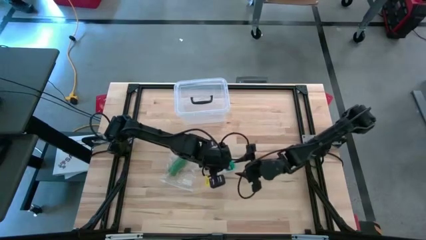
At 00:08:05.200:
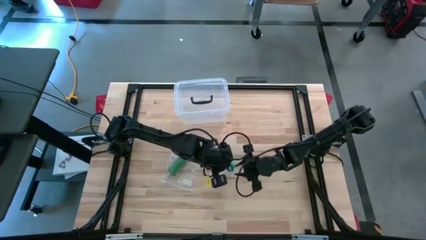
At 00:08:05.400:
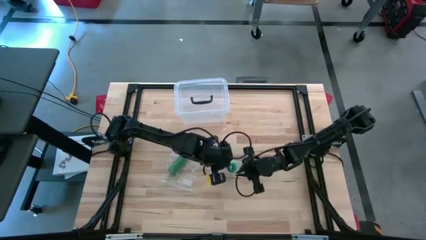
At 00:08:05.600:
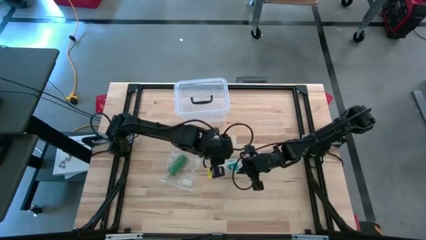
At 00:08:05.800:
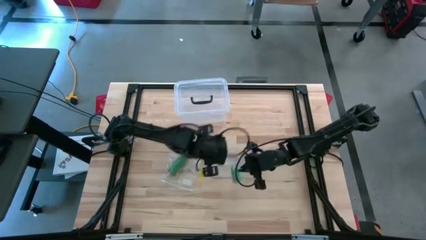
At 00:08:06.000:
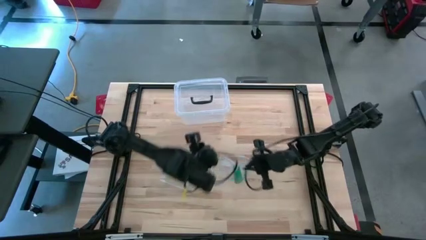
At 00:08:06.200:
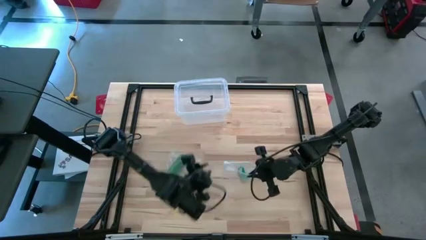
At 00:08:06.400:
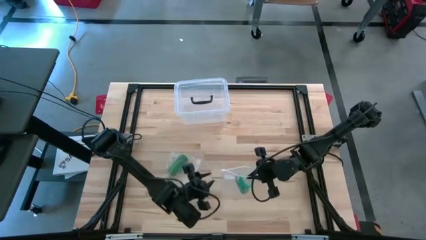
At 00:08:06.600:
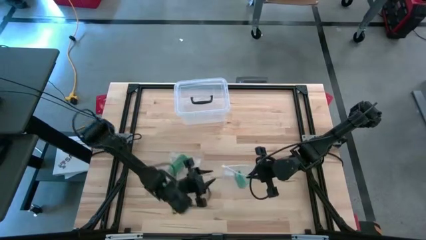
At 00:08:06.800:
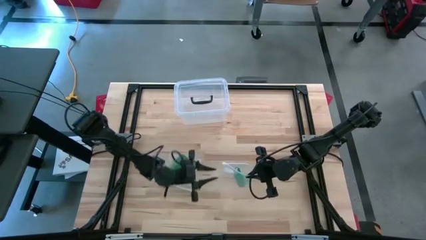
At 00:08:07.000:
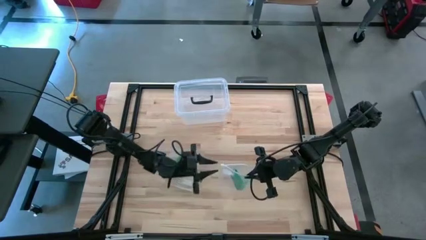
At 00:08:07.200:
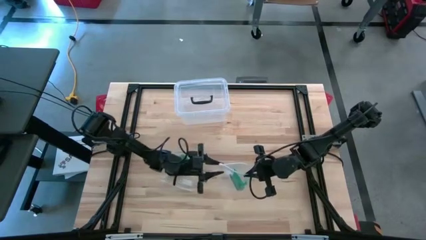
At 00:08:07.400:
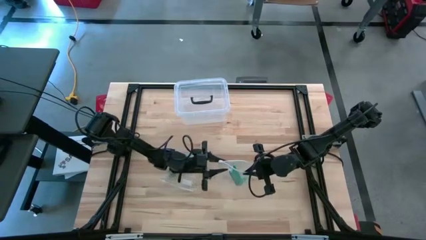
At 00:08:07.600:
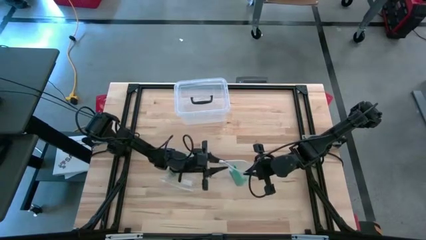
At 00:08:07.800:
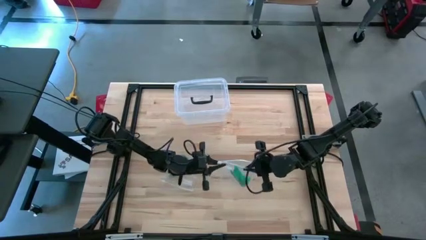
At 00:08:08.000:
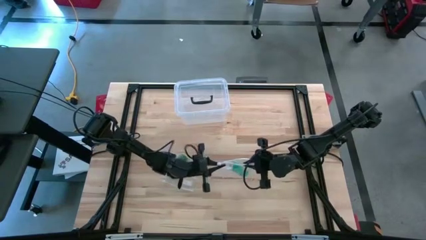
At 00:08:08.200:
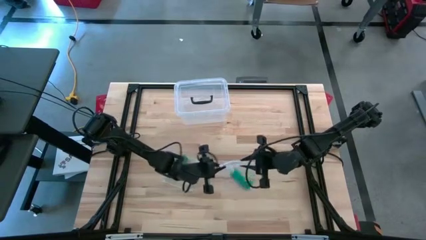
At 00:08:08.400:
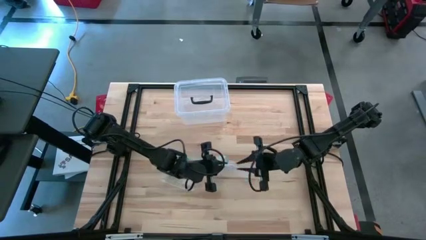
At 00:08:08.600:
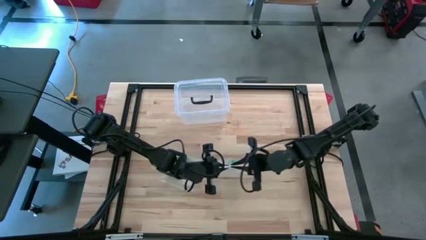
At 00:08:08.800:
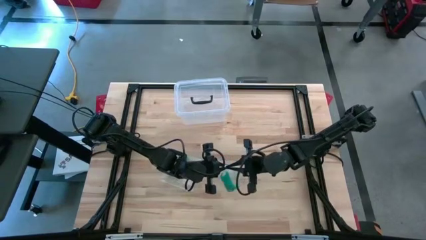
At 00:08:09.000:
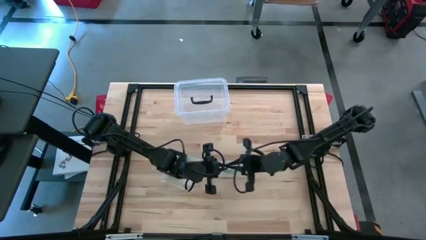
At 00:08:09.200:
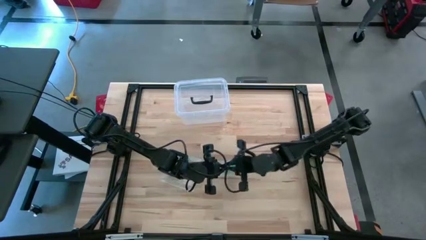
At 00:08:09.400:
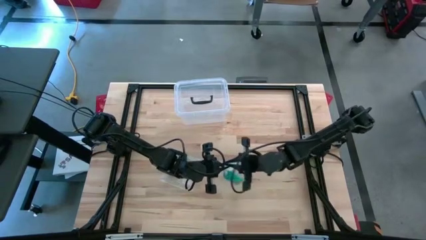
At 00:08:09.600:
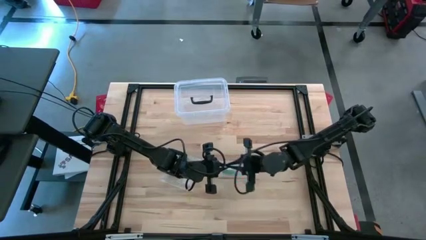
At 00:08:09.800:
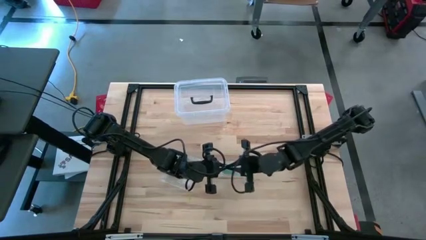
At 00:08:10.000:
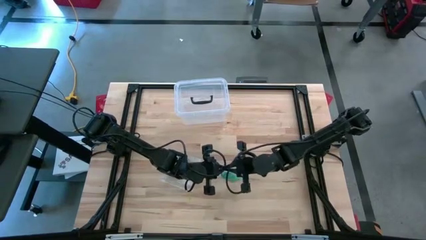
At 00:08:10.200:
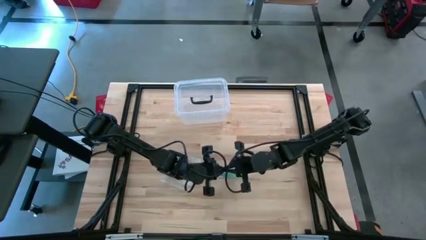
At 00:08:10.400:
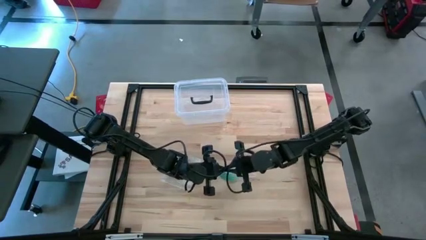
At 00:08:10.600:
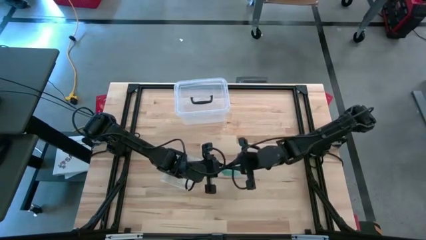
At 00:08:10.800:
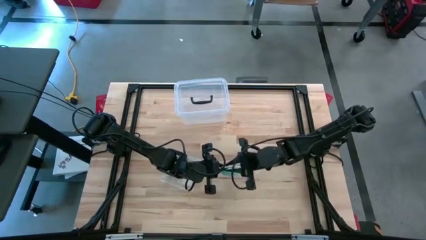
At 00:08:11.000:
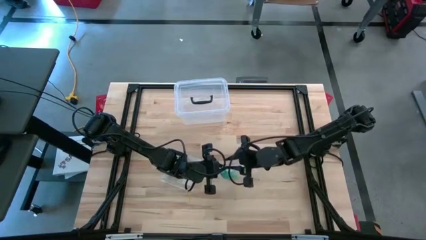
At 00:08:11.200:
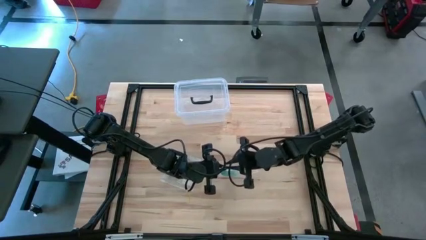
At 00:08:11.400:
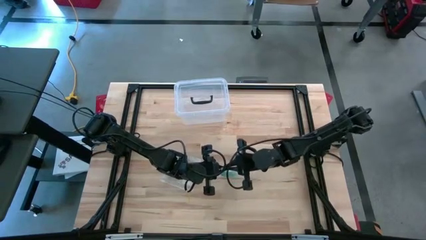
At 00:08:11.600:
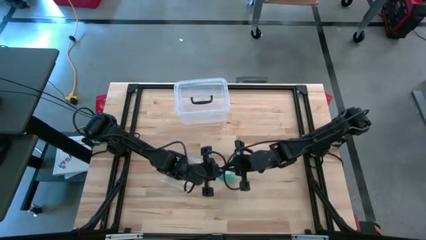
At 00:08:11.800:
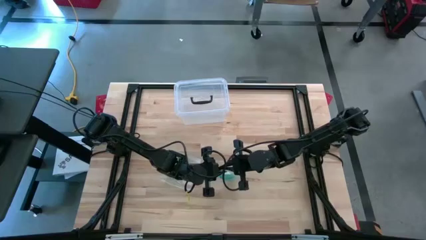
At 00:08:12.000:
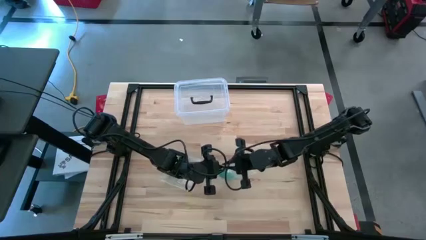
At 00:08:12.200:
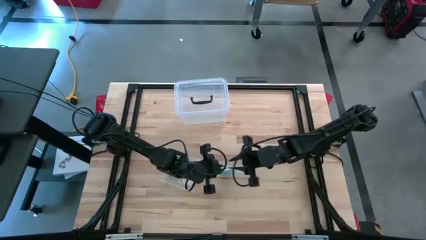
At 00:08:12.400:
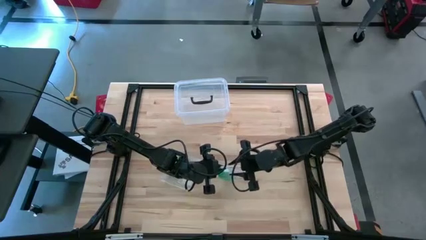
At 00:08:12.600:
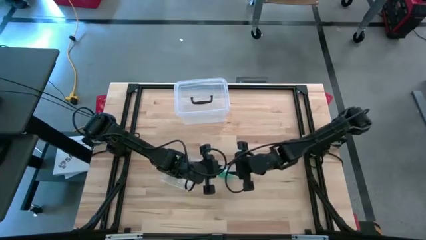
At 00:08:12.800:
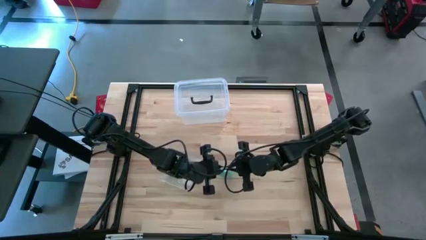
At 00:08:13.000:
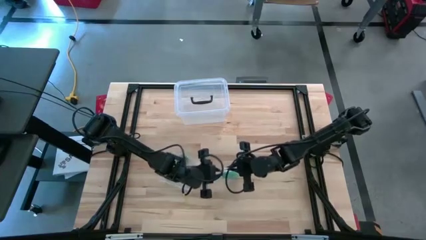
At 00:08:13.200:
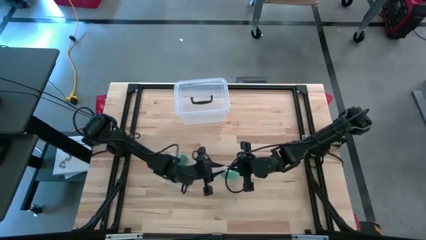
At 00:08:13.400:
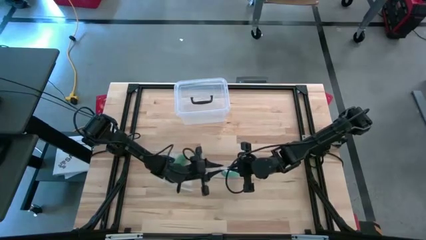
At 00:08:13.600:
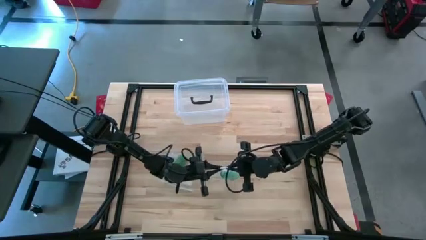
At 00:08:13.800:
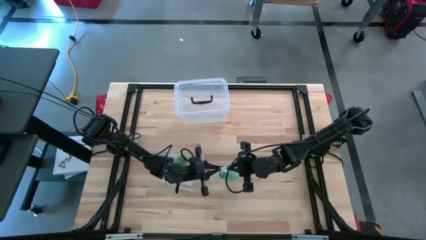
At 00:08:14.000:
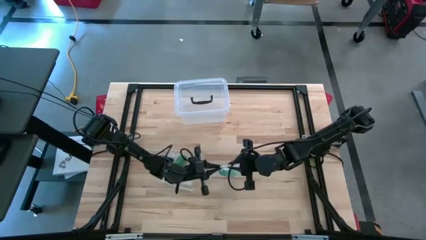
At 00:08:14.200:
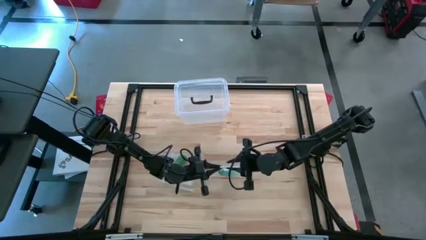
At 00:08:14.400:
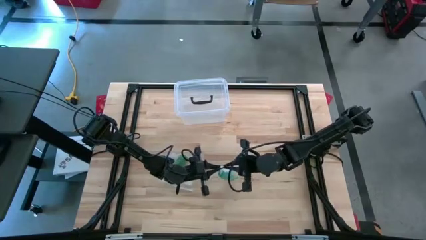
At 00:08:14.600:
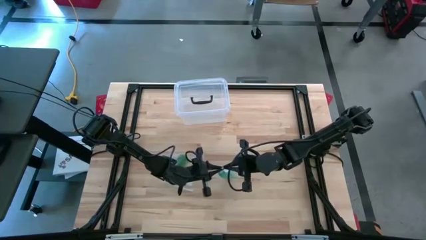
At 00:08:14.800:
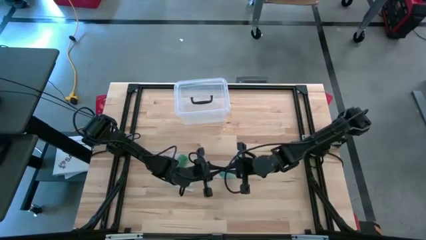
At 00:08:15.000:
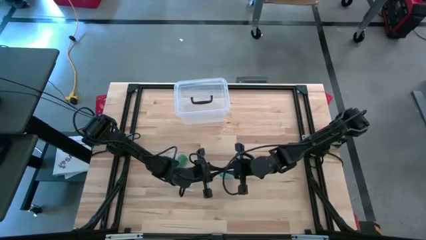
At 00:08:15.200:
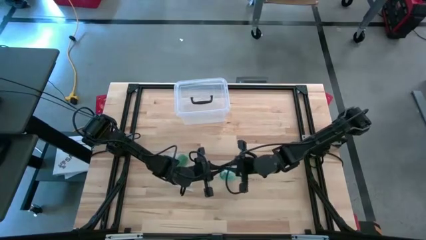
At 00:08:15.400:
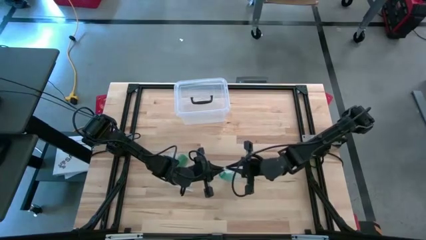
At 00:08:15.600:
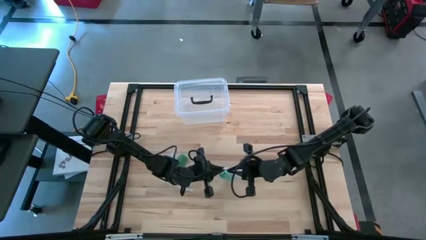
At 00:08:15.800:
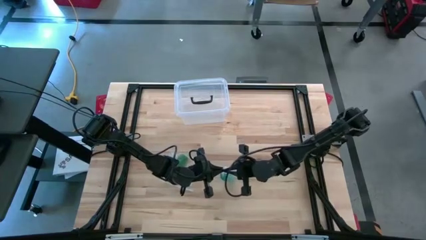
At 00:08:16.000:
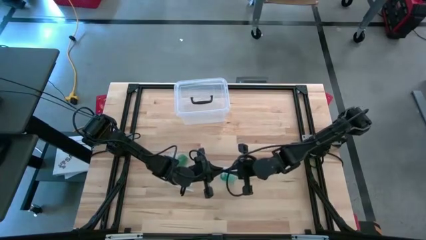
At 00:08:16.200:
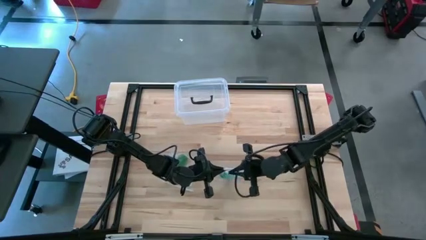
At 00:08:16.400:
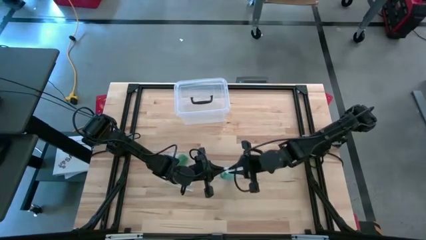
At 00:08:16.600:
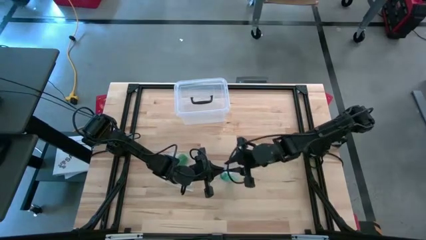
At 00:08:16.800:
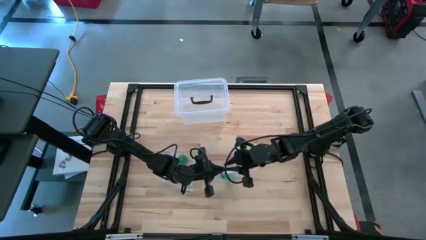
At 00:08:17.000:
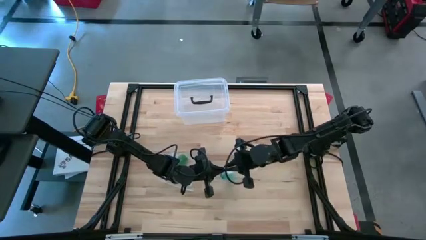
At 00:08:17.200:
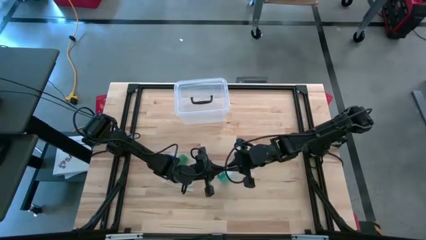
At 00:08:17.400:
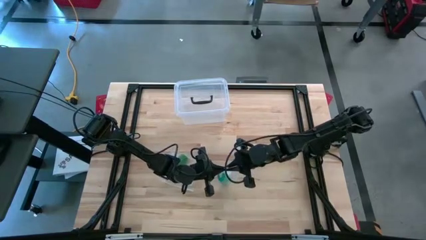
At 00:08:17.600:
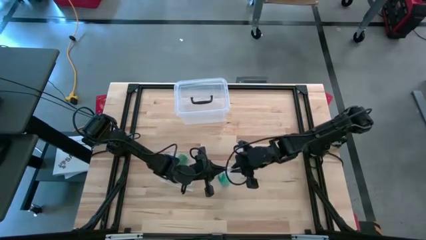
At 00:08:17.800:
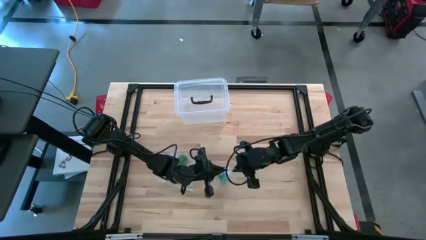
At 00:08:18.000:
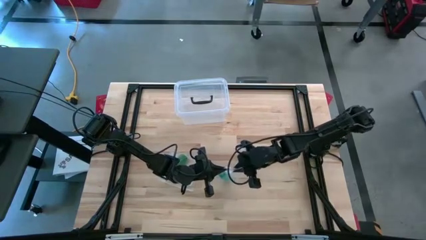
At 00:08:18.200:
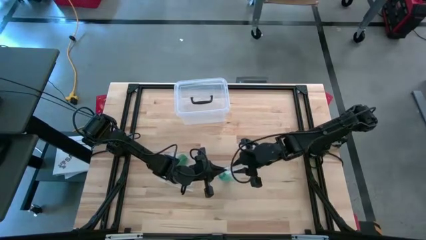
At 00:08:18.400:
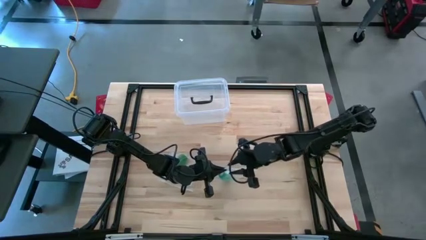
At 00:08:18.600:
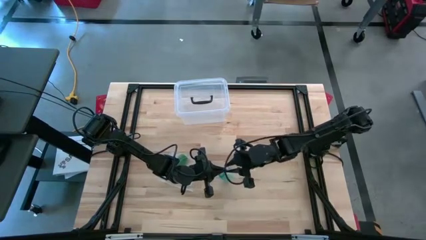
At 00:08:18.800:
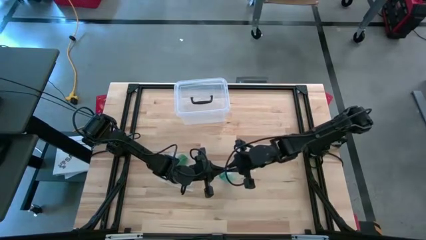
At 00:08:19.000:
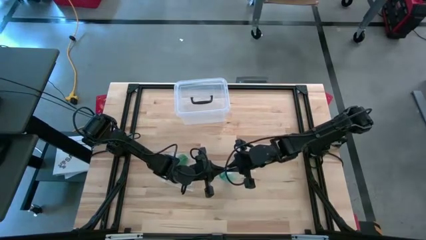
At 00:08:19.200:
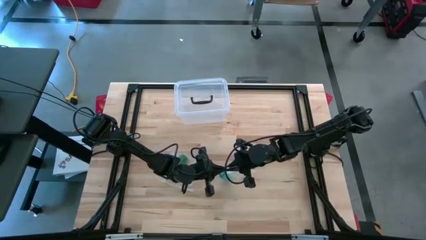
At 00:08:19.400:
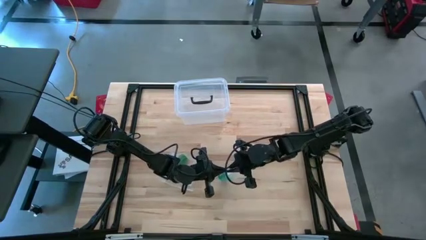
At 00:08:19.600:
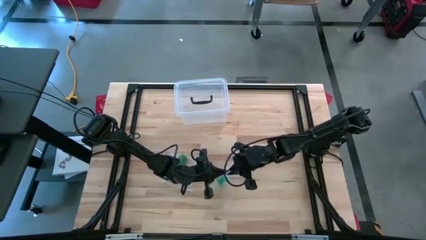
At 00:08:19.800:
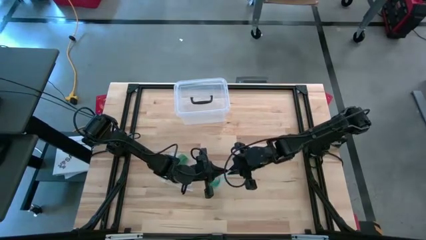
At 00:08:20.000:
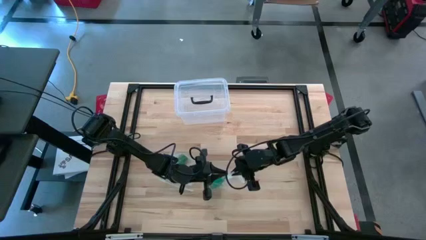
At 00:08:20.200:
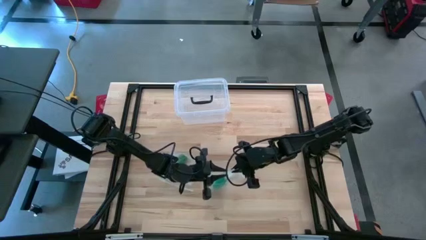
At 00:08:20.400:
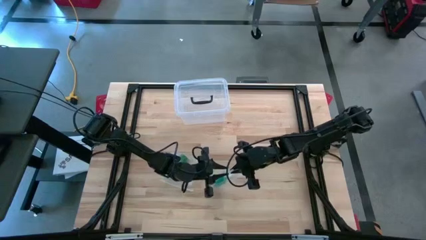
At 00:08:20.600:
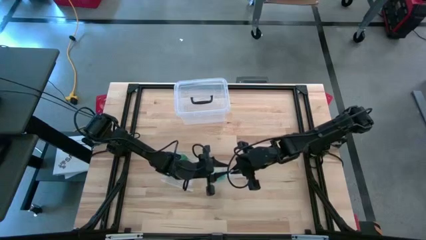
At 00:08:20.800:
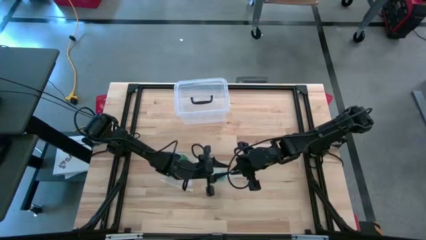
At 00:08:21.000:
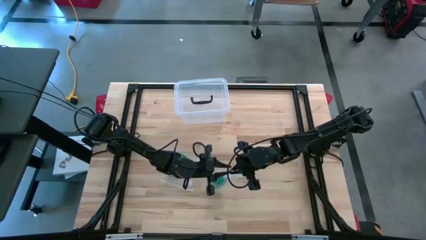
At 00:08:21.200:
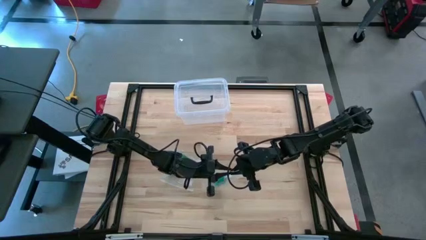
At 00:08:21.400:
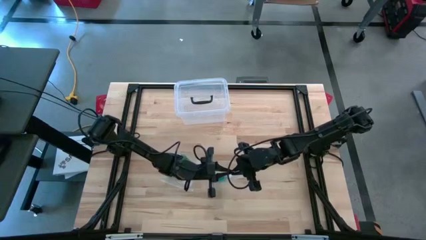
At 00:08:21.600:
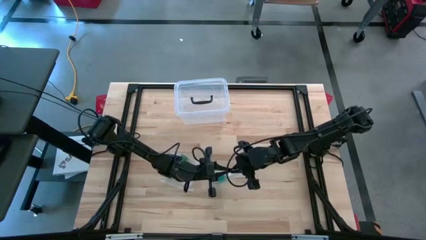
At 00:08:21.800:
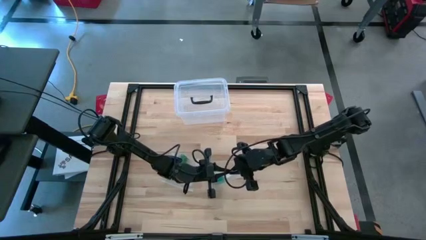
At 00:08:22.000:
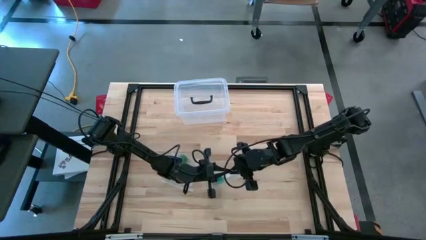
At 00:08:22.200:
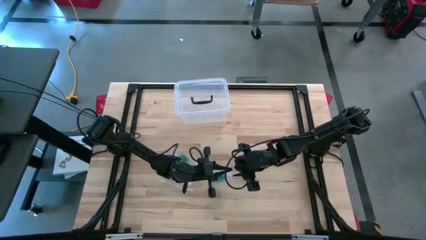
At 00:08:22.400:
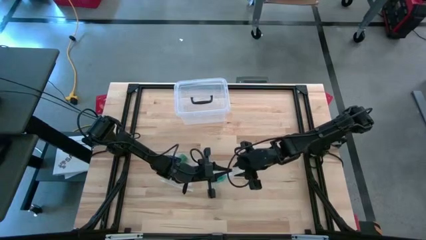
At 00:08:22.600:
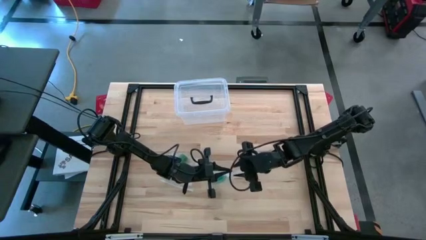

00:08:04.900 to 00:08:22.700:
Task: Roll bandage
Close the zip bag
